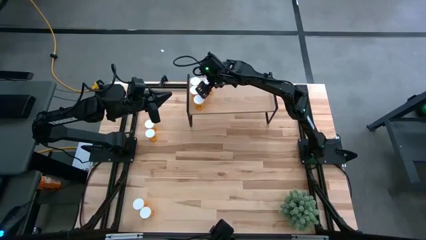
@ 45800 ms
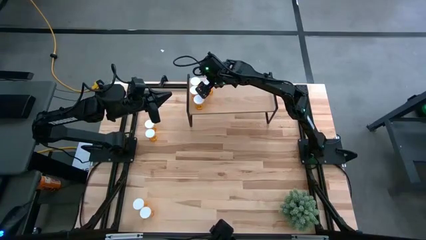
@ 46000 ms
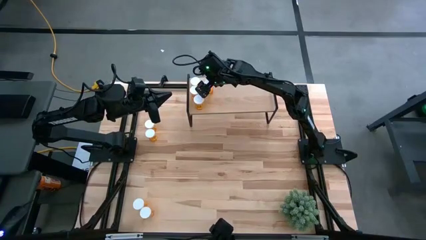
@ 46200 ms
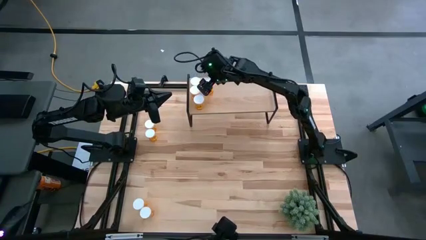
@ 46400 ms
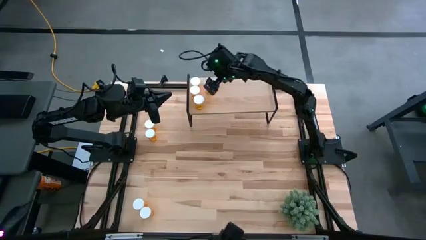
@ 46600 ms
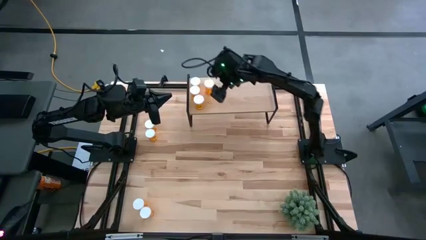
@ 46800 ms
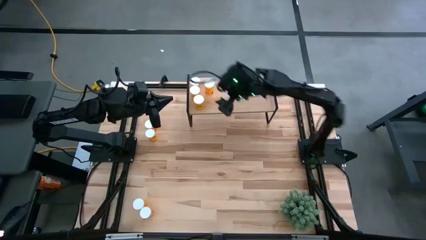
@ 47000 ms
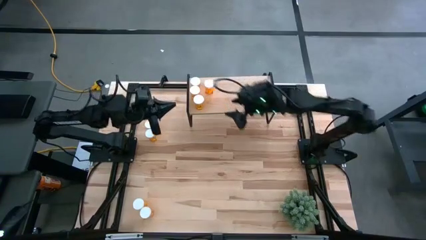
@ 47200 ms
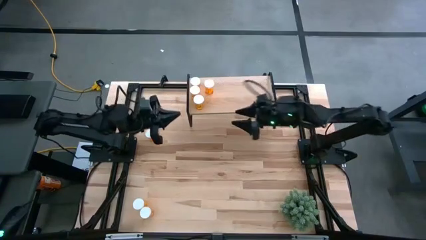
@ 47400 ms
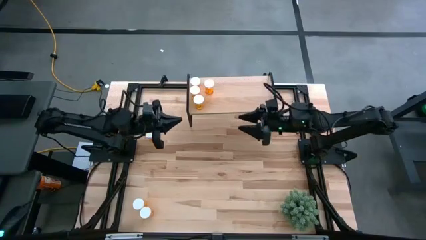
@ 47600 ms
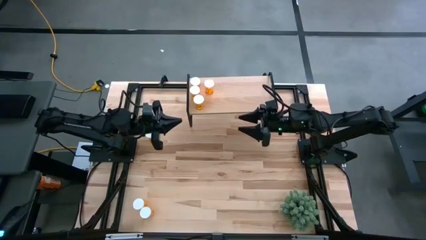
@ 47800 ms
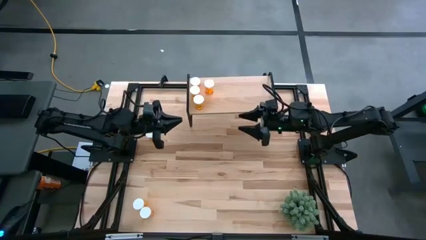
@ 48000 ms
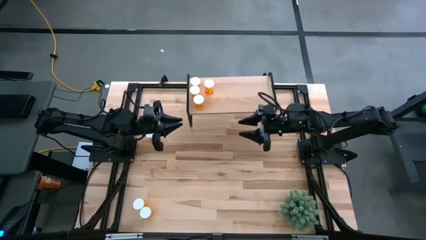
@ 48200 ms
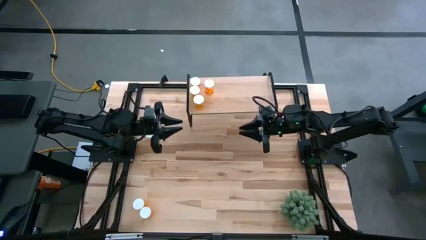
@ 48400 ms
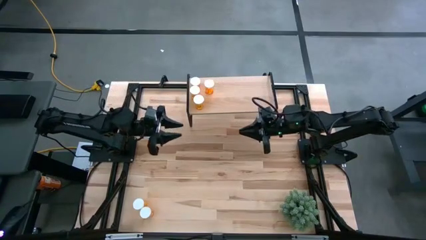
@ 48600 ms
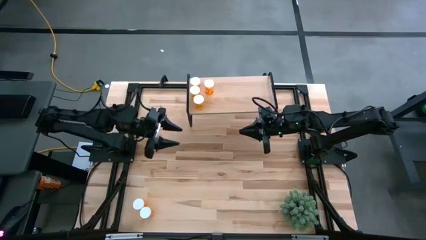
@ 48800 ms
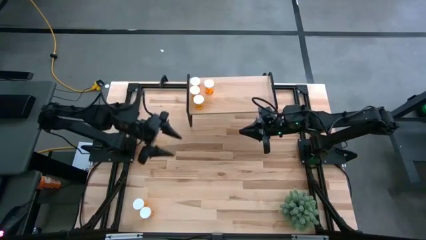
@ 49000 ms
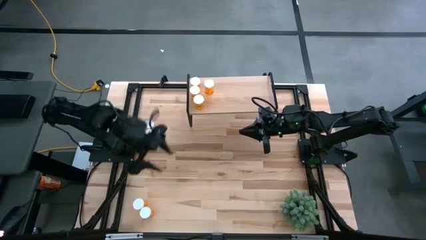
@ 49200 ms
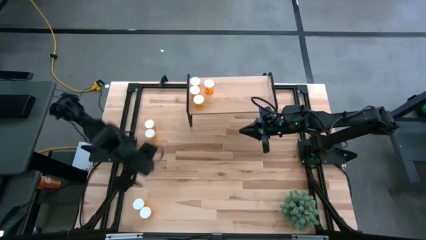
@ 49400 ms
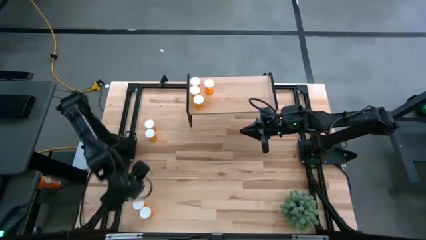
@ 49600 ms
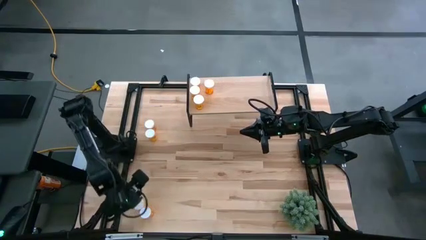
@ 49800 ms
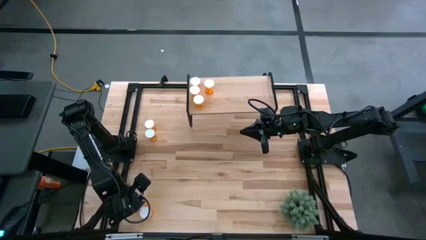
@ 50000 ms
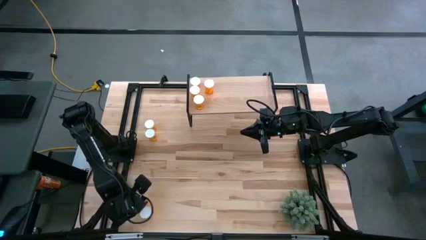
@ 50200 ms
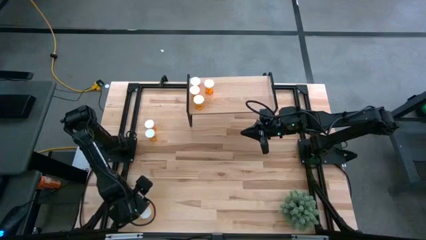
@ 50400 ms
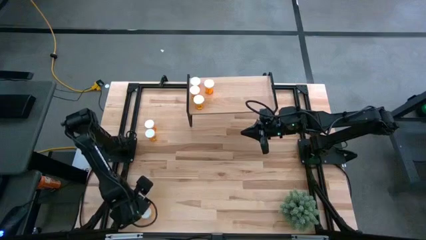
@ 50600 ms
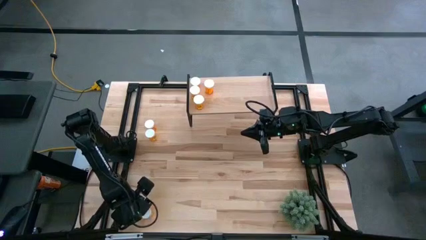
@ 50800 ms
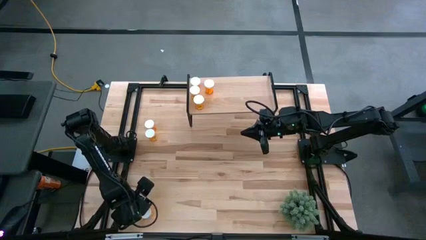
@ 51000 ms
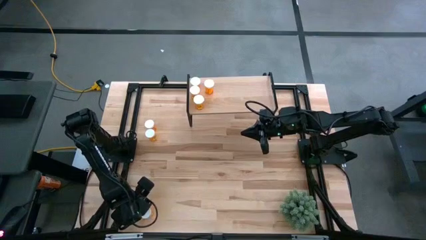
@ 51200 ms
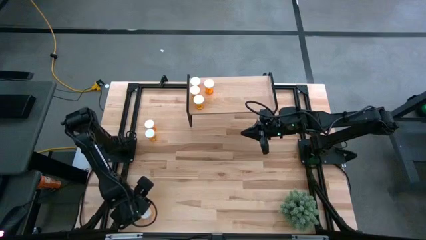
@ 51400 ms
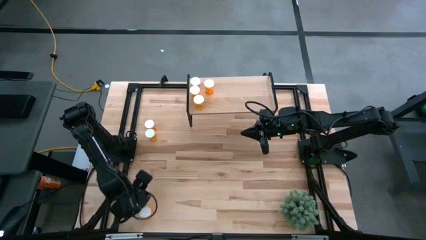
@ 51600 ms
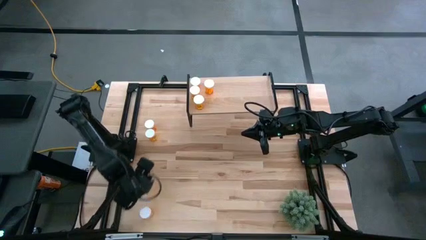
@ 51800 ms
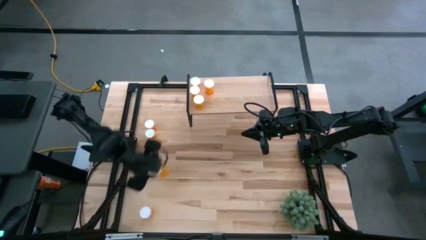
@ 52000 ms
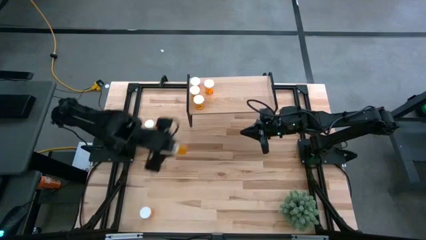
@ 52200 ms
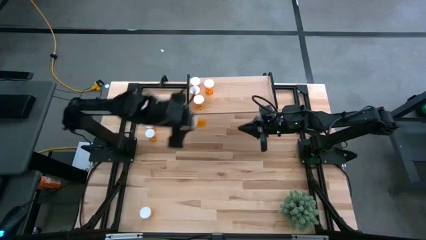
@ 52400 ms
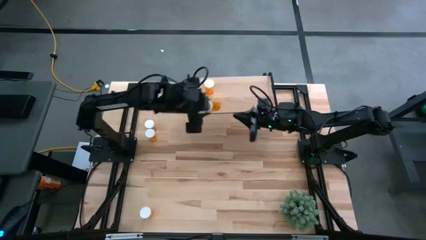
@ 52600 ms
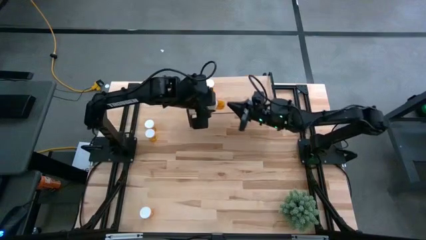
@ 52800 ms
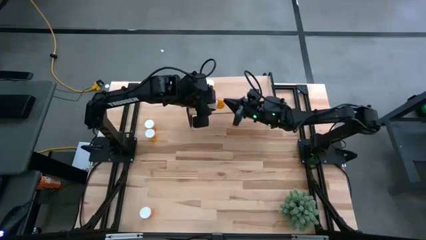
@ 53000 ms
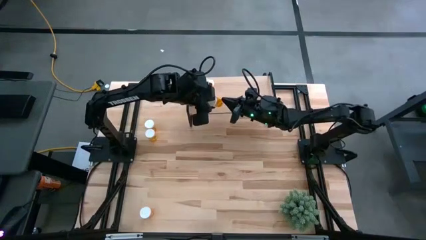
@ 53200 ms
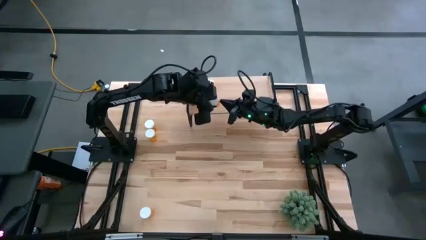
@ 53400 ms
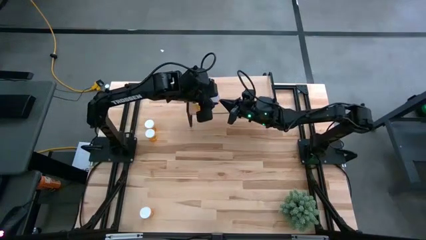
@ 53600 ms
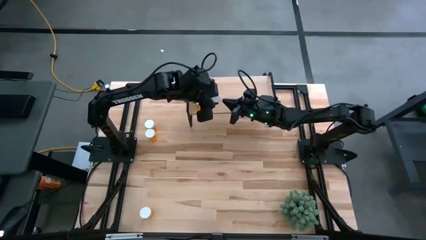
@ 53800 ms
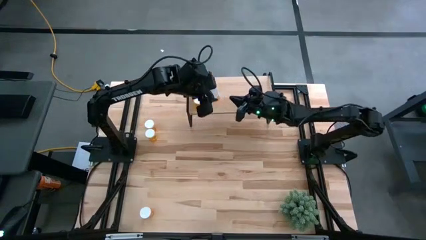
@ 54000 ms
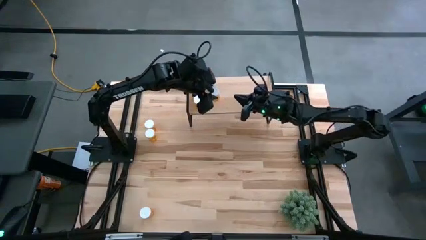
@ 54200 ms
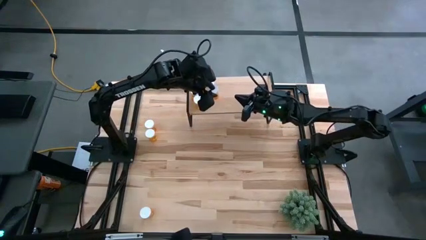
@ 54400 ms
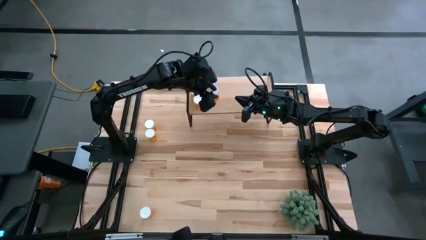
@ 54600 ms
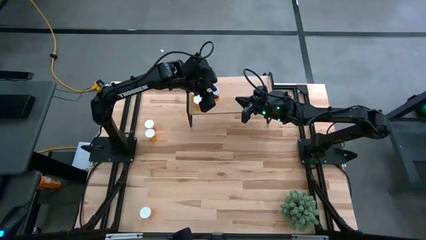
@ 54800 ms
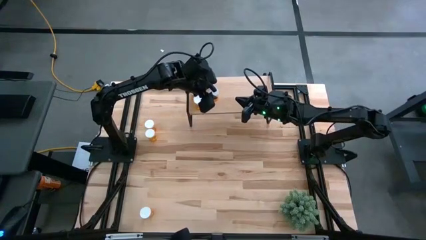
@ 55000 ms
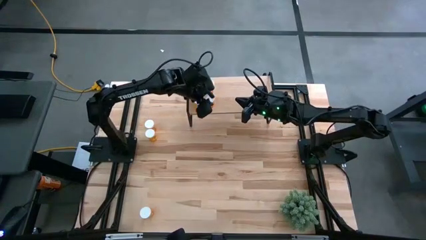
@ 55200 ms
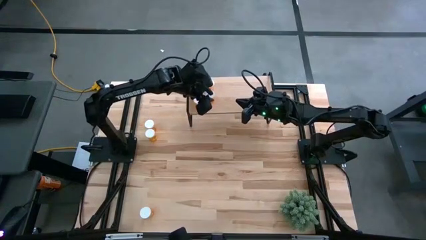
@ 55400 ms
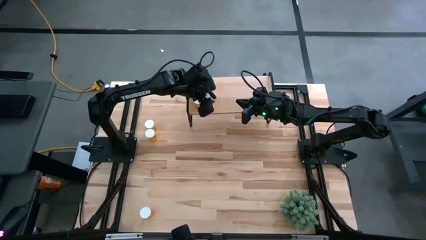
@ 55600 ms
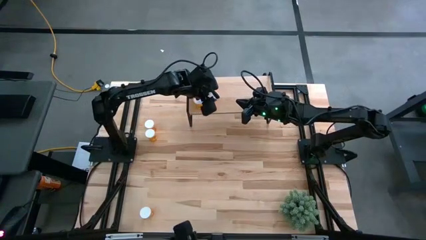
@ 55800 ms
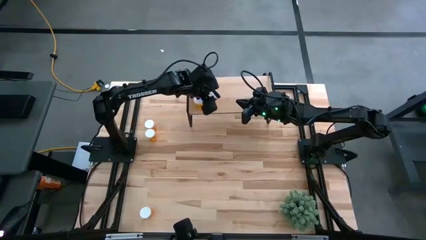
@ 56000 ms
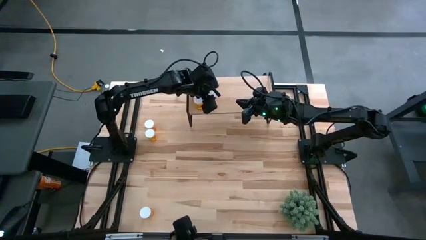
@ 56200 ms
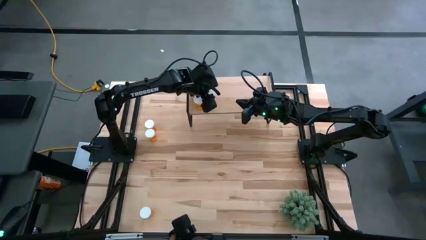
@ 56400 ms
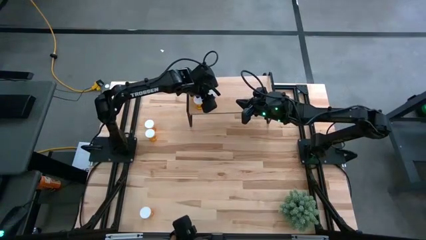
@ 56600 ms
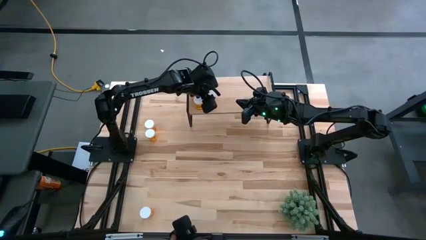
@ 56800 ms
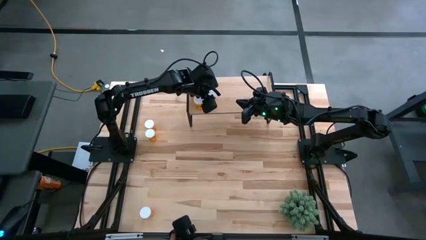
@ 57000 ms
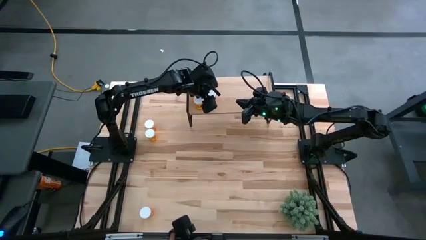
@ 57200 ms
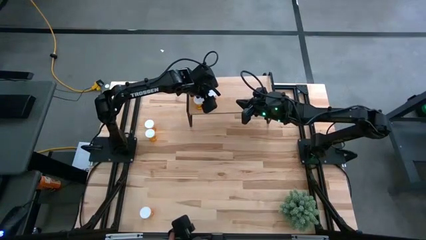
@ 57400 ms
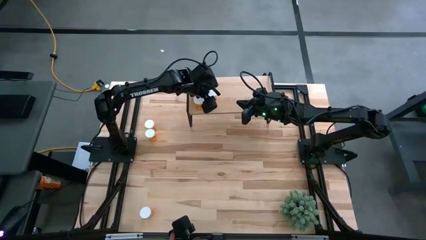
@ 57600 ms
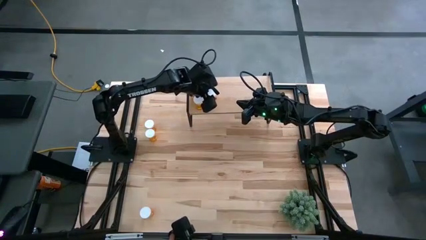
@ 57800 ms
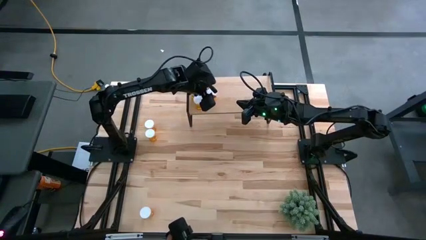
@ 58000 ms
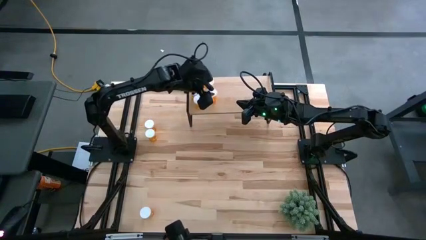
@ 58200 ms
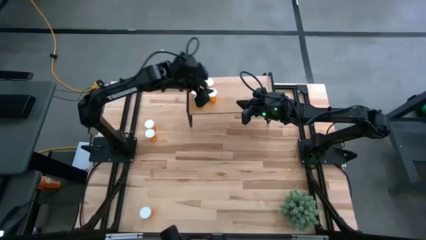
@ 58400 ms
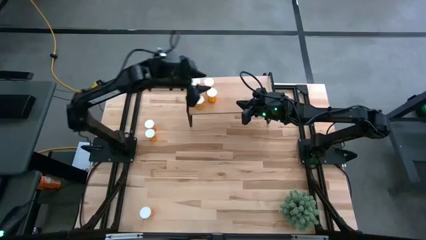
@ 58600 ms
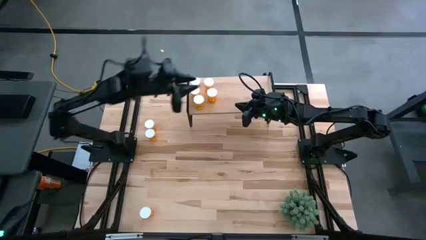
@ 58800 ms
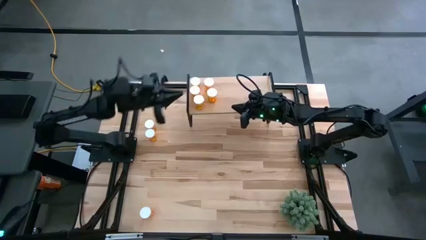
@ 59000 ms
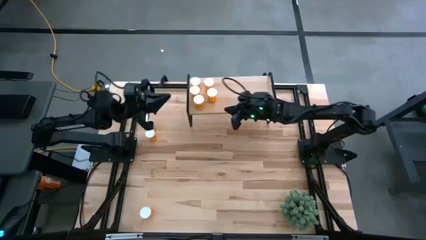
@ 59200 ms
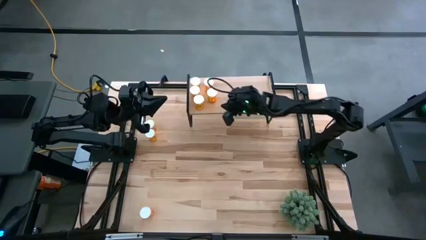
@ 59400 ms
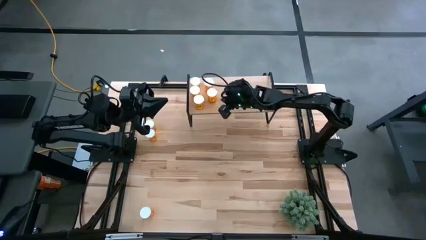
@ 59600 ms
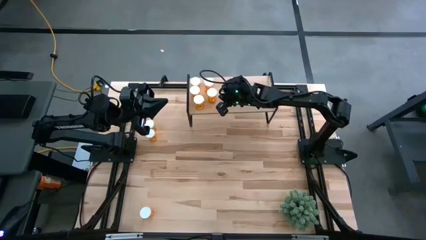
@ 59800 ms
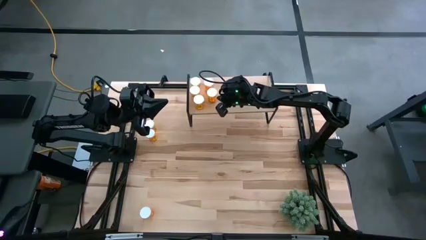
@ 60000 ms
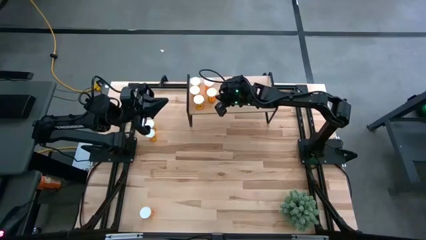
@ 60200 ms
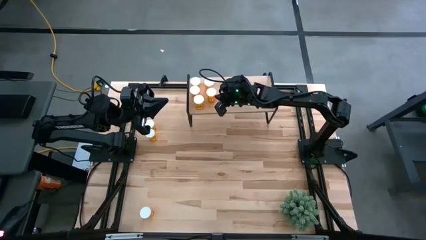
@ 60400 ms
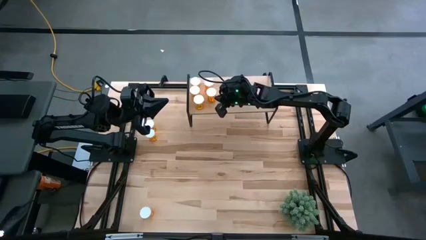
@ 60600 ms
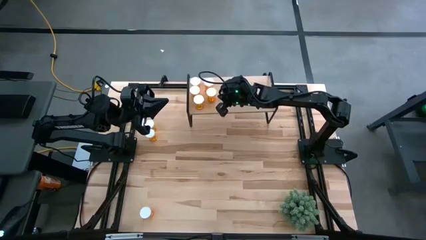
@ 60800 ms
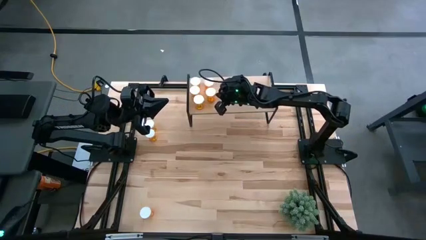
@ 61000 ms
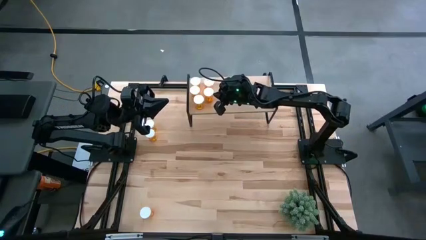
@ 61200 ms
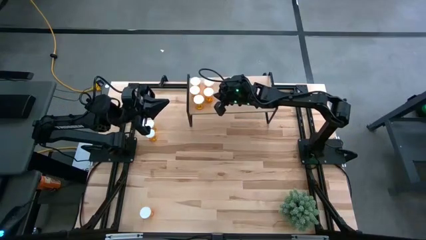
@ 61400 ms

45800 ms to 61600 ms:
Task: Pick and place medicine bottles onto shelf by color
Put the orange pill bottle on the shelf aligned with the other orange pill bottle

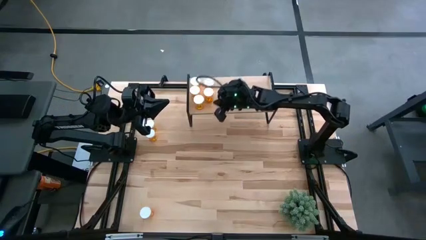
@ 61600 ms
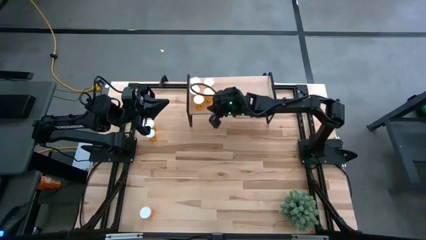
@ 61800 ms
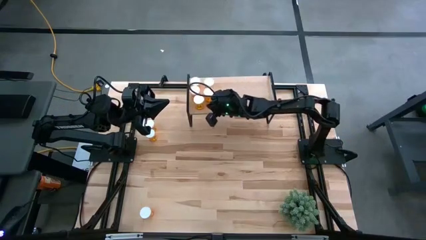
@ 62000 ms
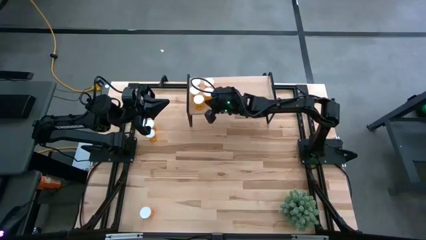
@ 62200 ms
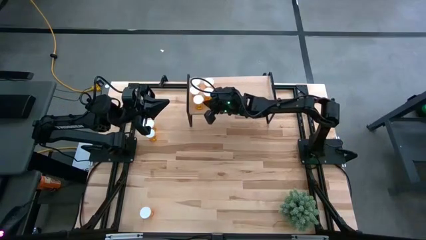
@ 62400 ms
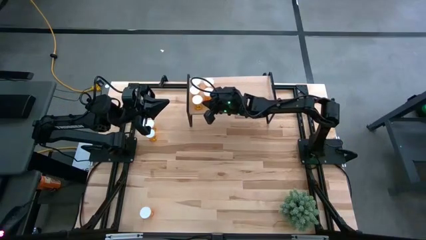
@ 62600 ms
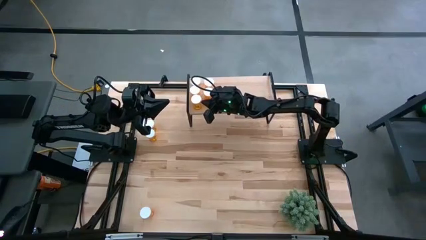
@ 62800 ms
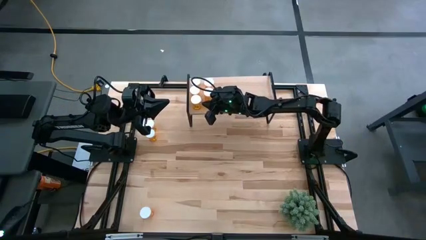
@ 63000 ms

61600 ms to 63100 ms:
Adjust the orange pill bottle on the shelf
